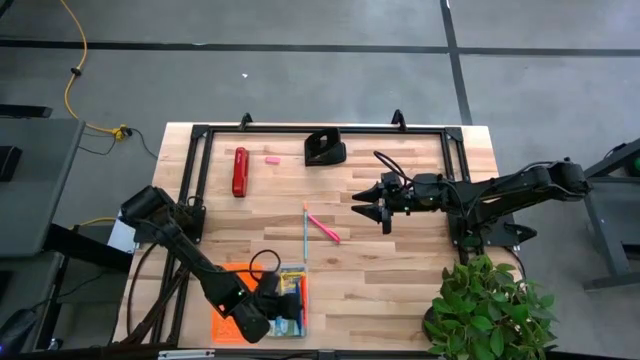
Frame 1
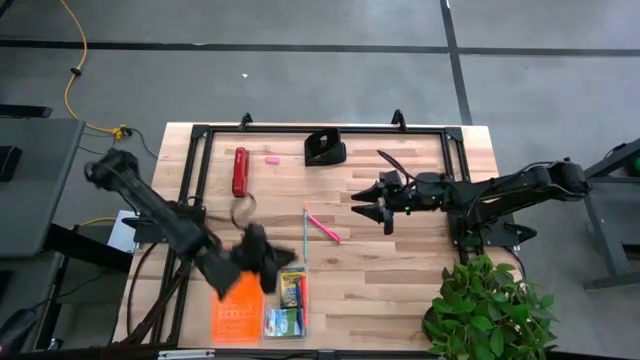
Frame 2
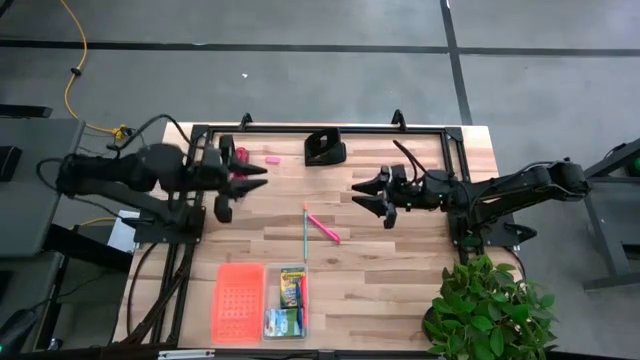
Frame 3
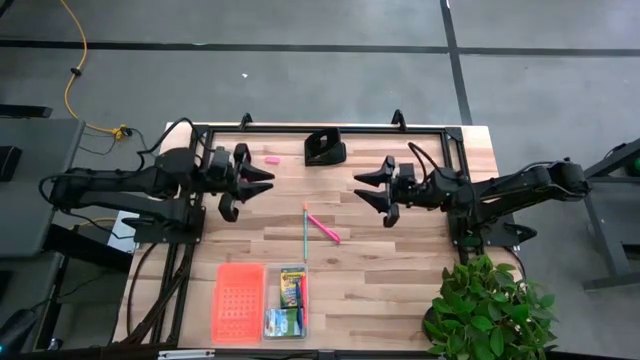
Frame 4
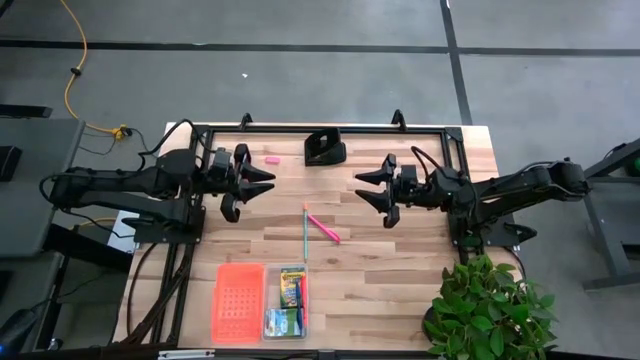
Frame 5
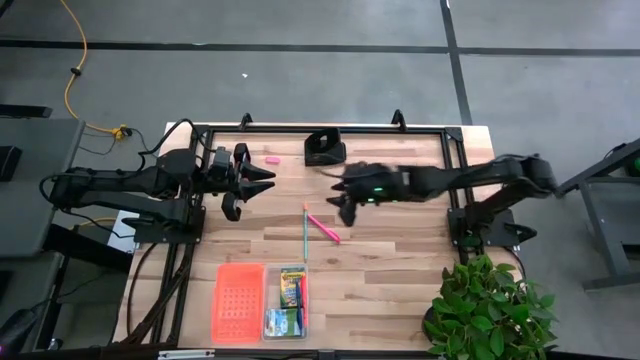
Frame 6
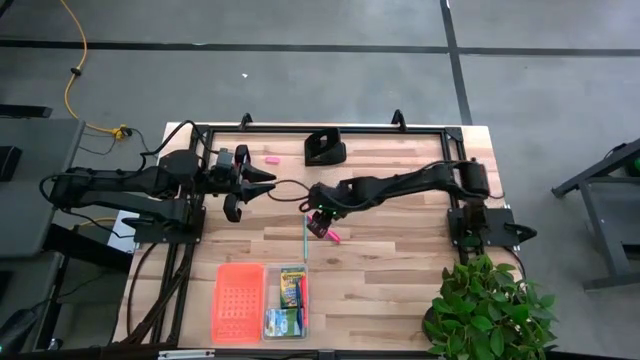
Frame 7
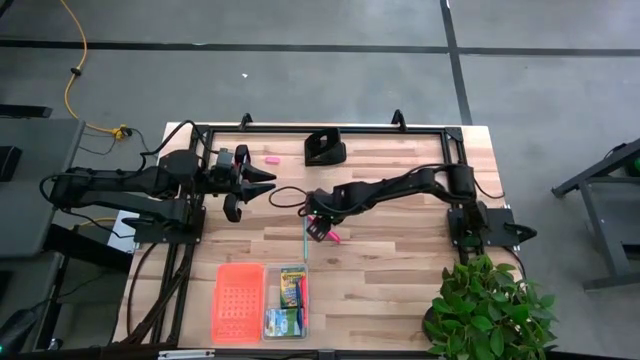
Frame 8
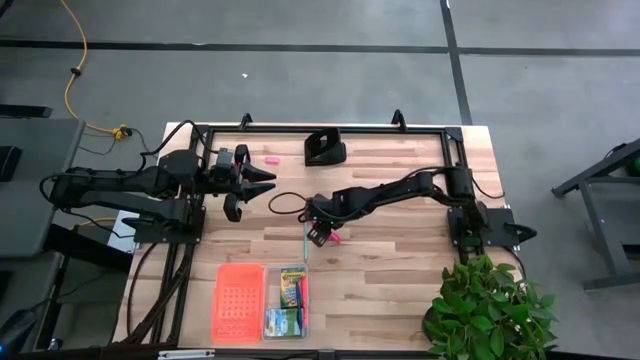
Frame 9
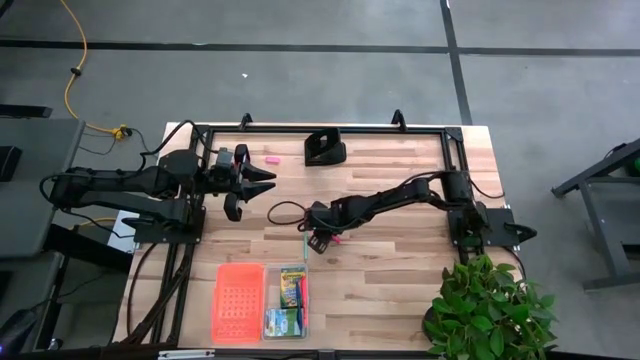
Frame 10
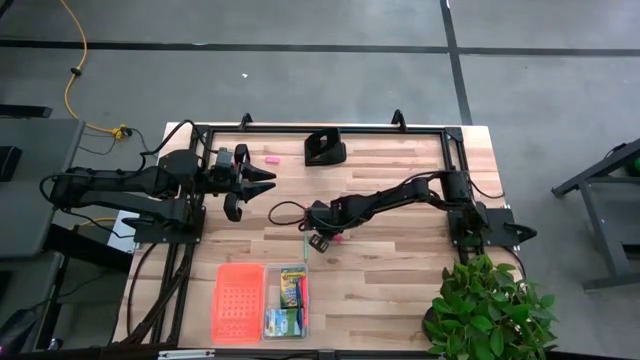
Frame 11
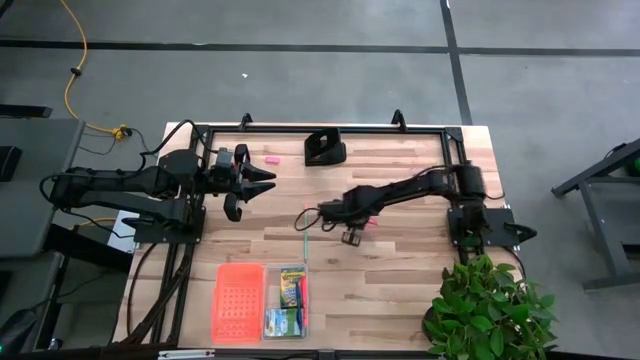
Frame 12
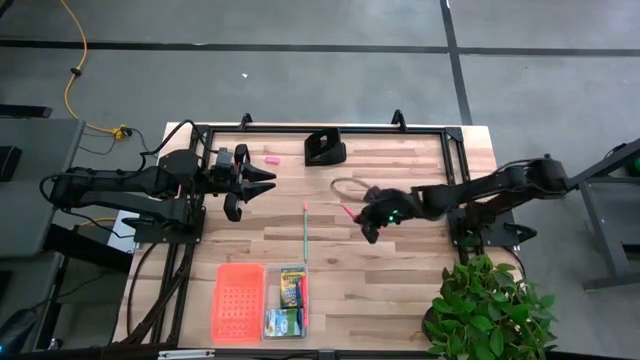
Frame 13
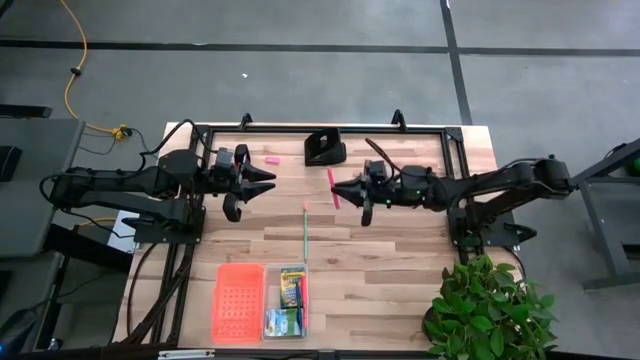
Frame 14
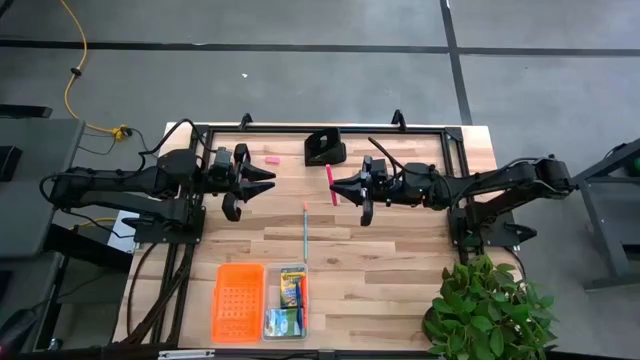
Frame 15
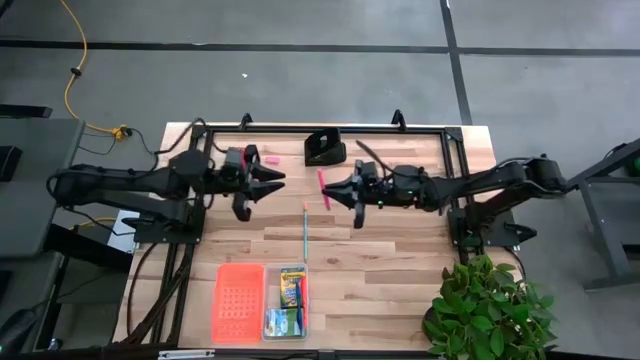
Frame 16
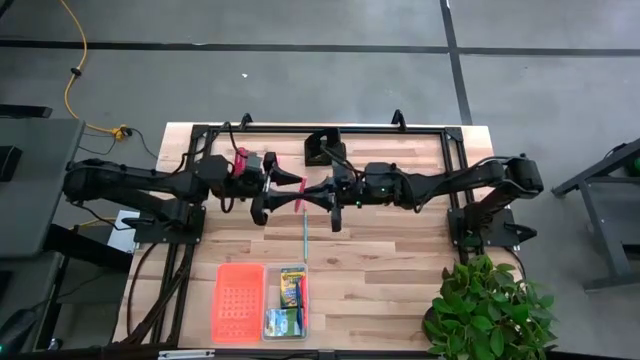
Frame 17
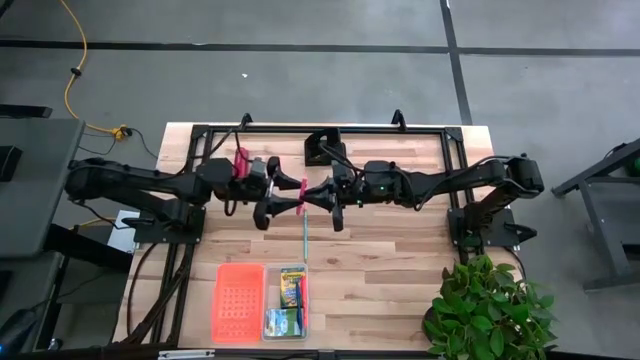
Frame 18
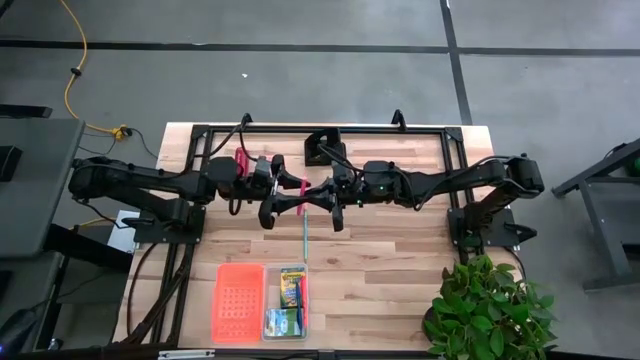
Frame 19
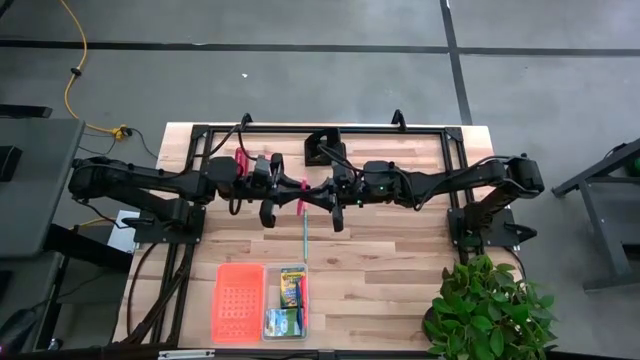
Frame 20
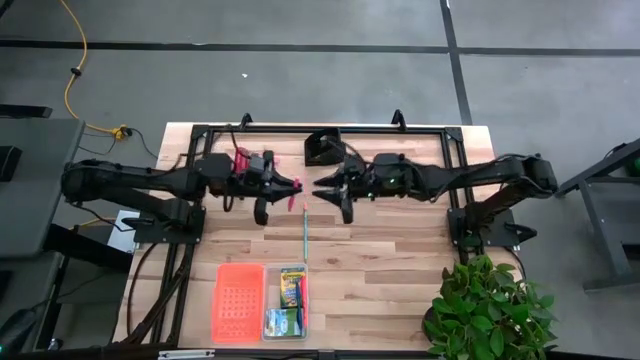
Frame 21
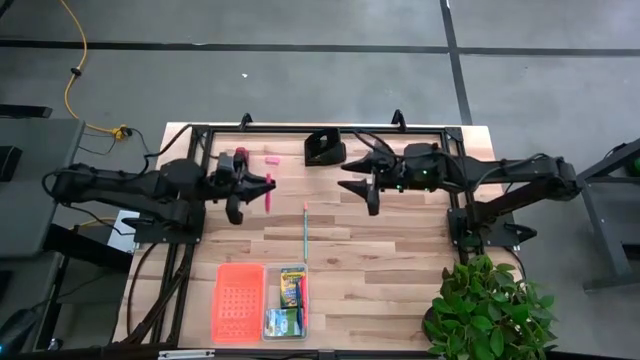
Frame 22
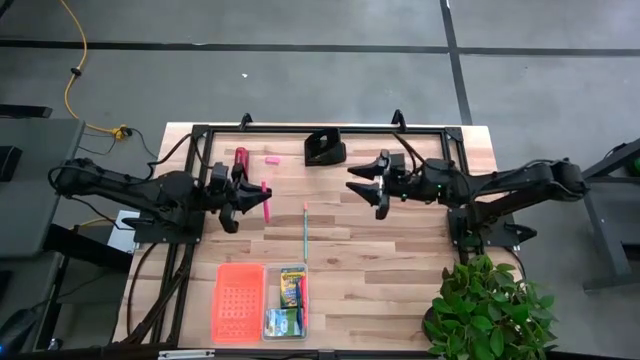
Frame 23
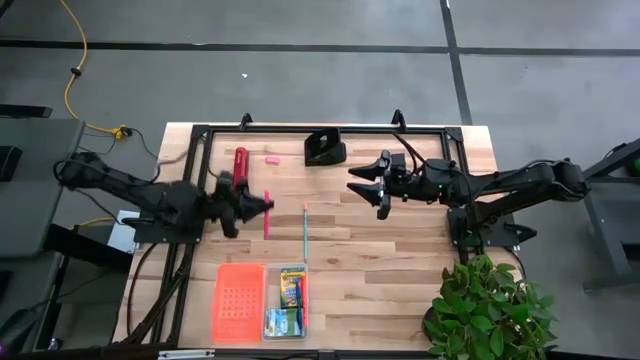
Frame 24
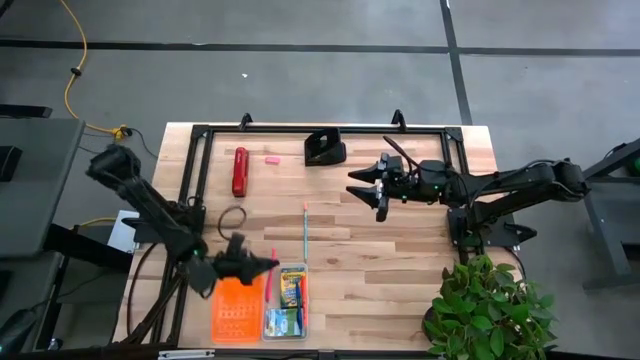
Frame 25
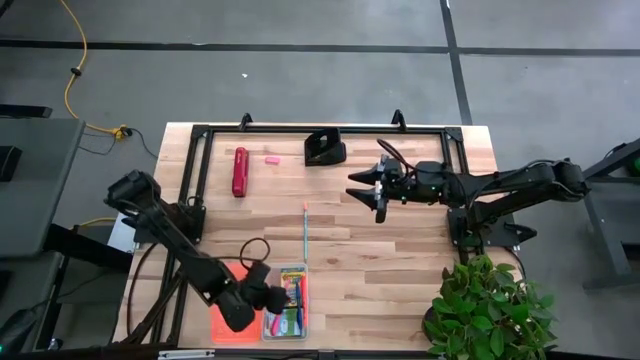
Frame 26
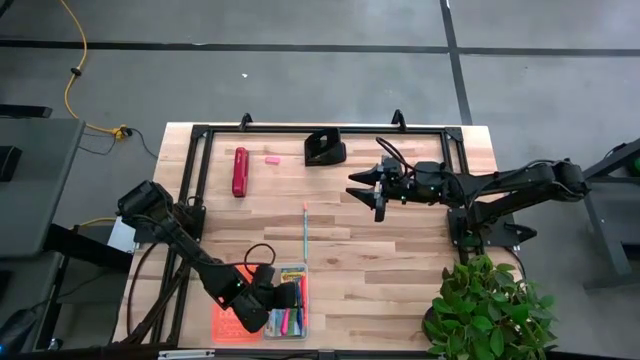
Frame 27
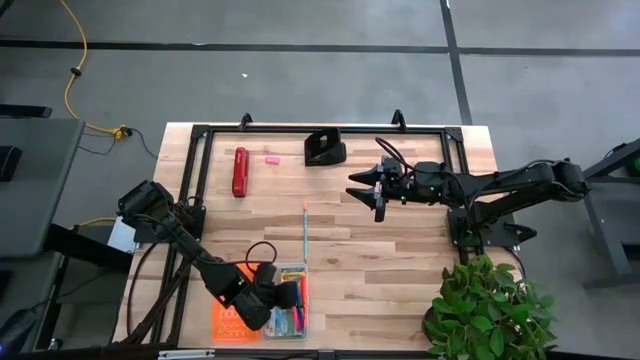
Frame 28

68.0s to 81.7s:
Task: Pack school essentials
Put the pink pen into the supply box

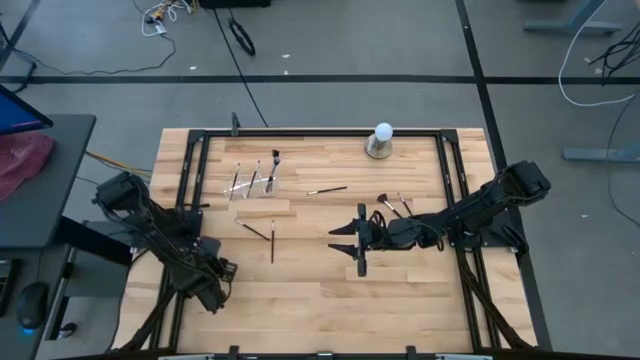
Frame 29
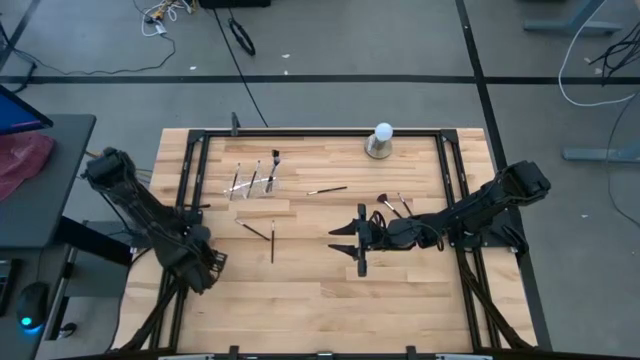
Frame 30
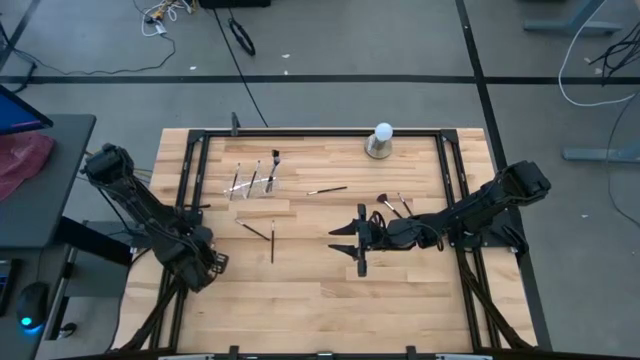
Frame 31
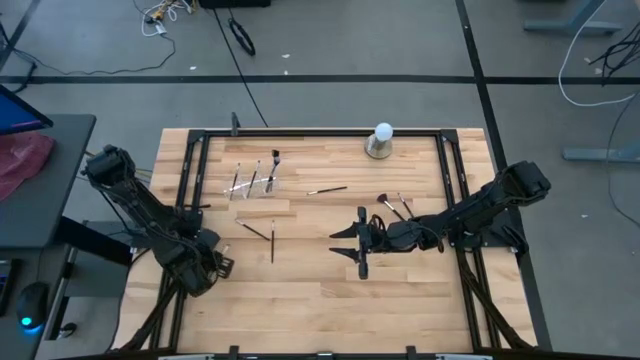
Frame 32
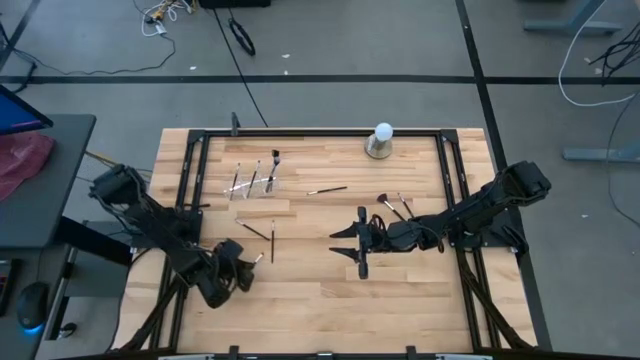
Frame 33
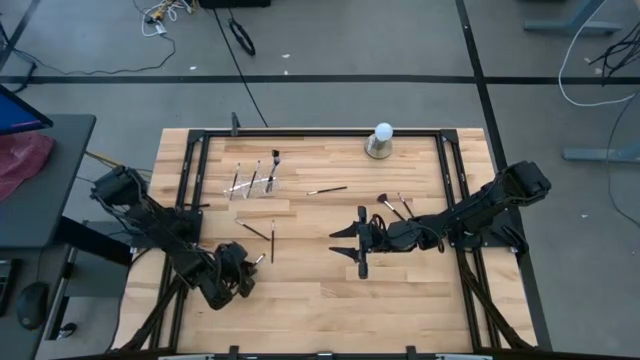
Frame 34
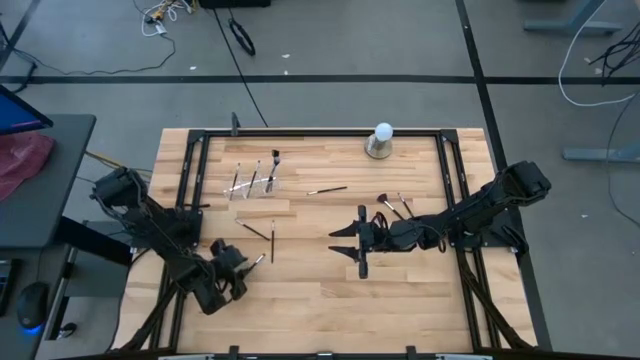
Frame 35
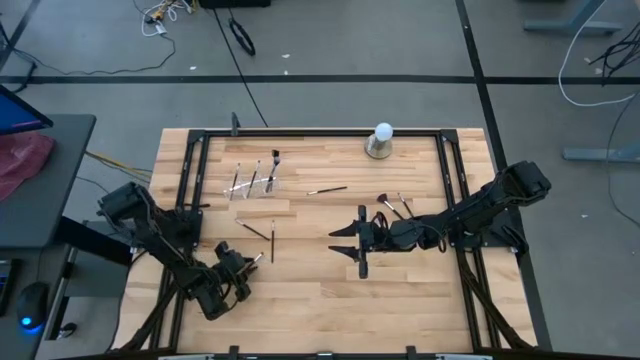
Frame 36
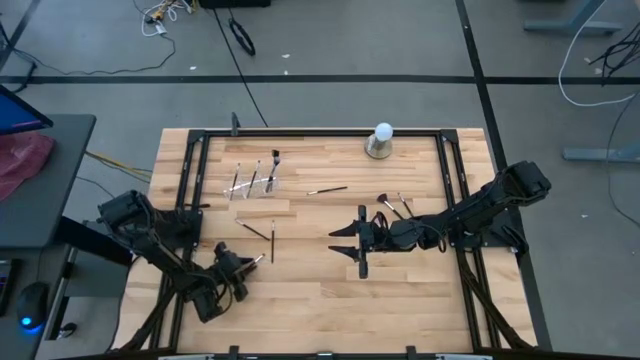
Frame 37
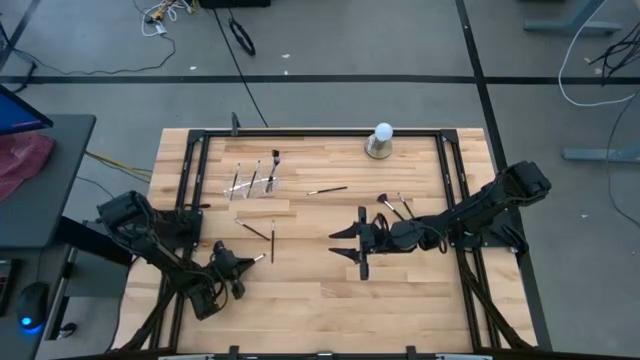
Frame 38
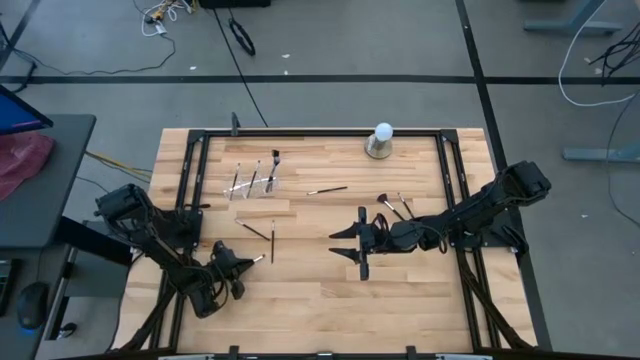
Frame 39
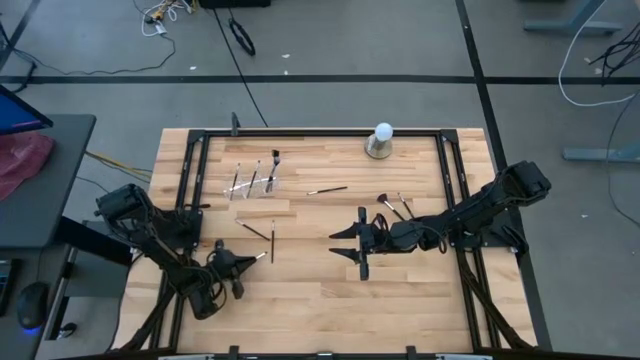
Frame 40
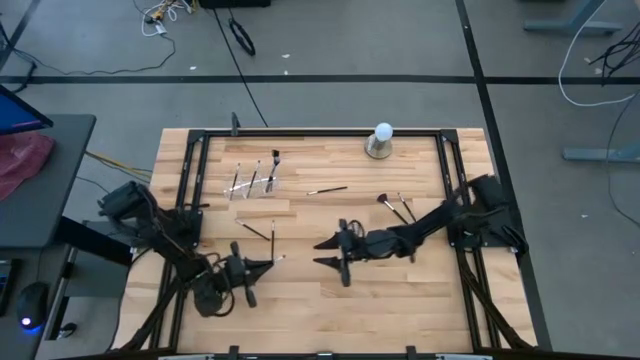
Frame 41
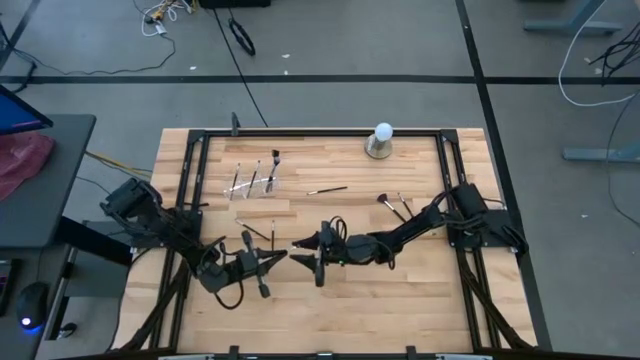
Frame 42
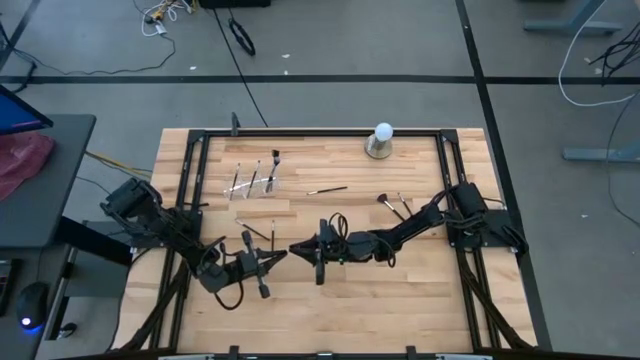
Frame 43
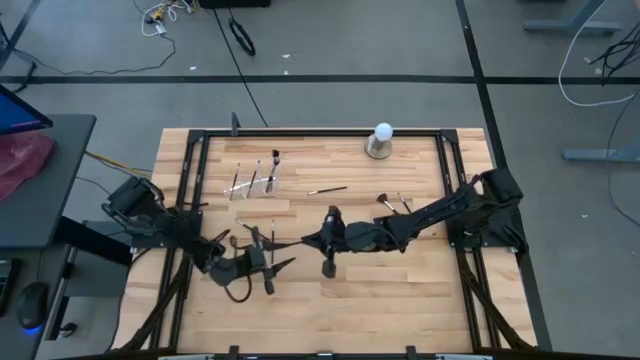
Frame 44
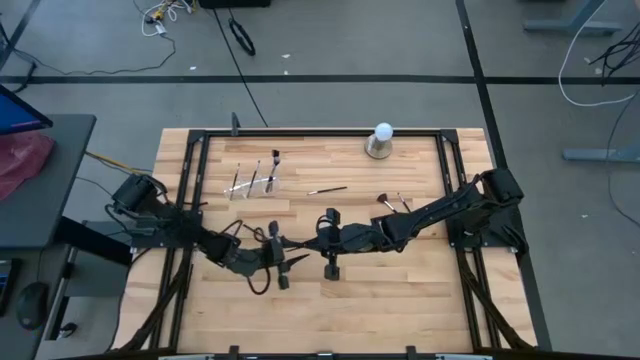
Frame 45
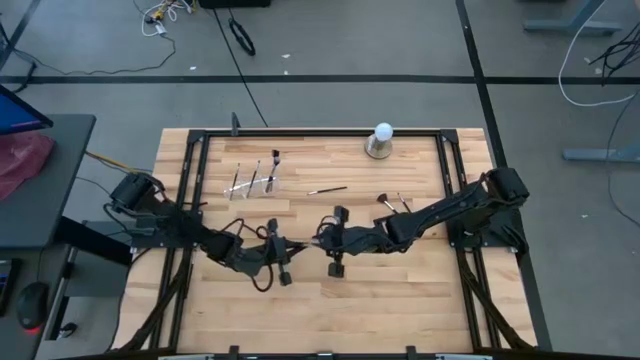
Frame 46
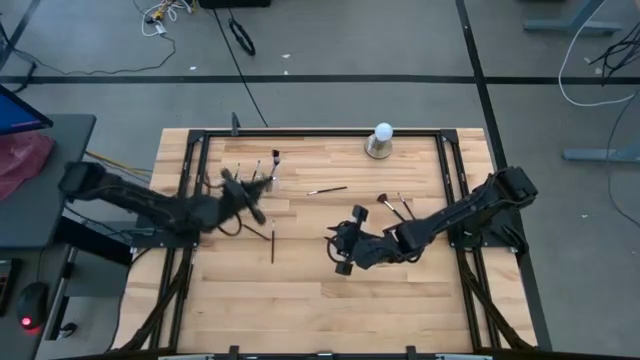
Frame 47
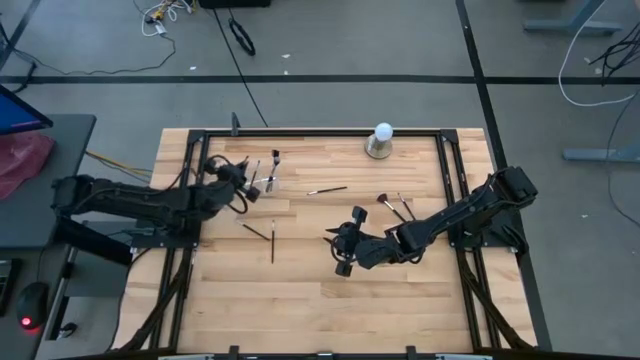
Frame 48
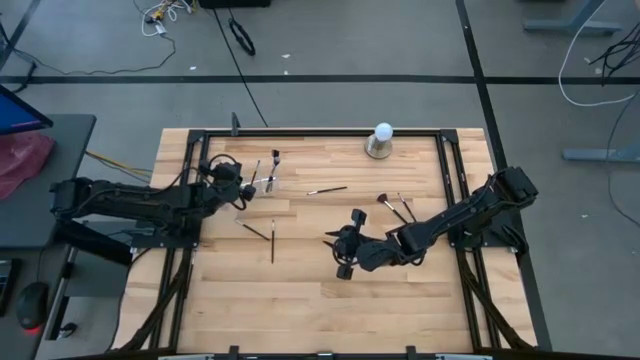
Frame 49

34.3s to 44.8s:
Task: Put items in baskets/containers
Put the black eyeshadow brush into the left section of the transparent organizer
